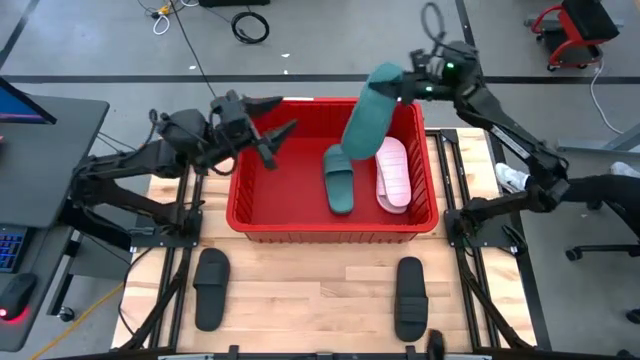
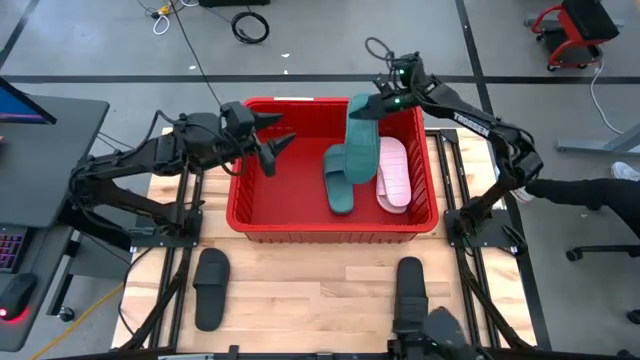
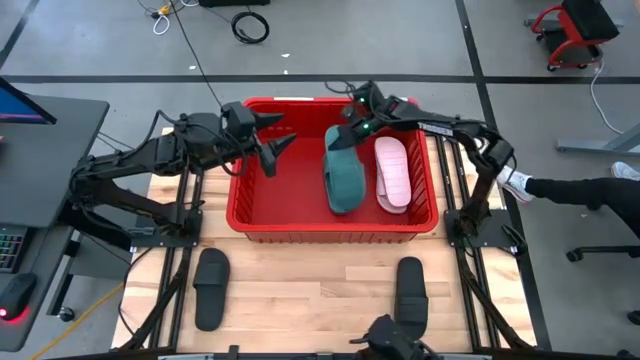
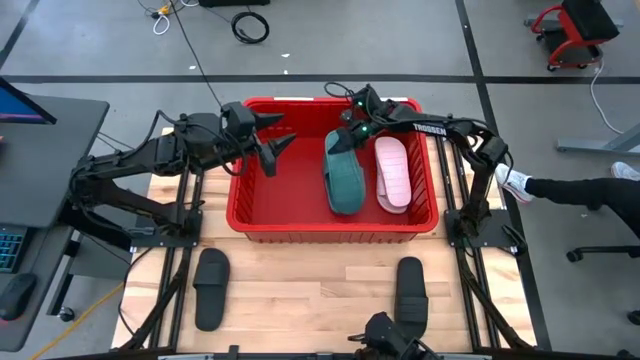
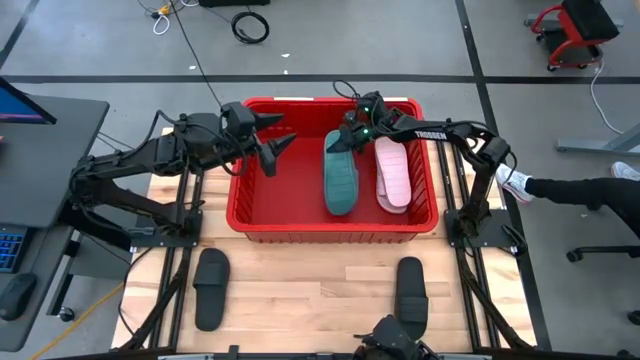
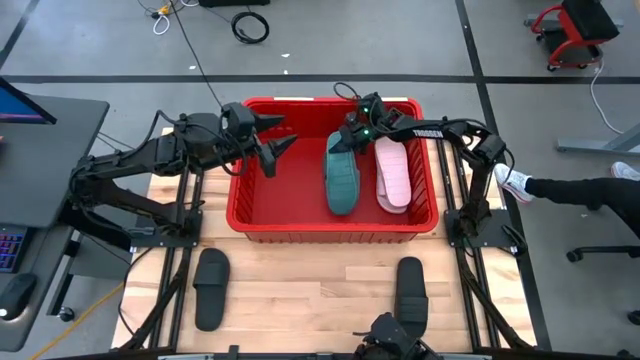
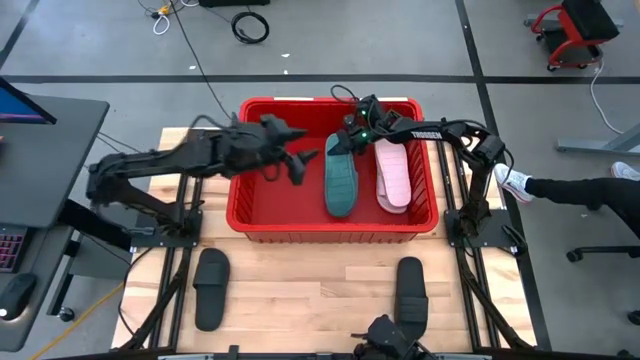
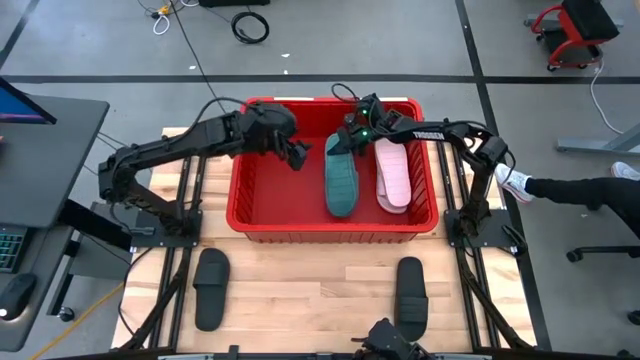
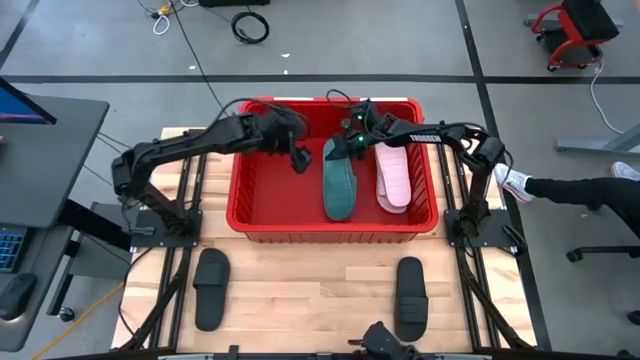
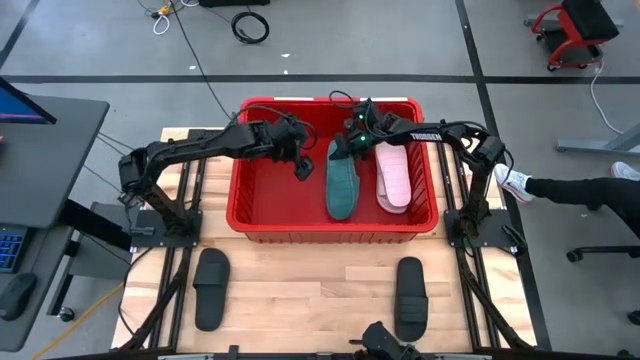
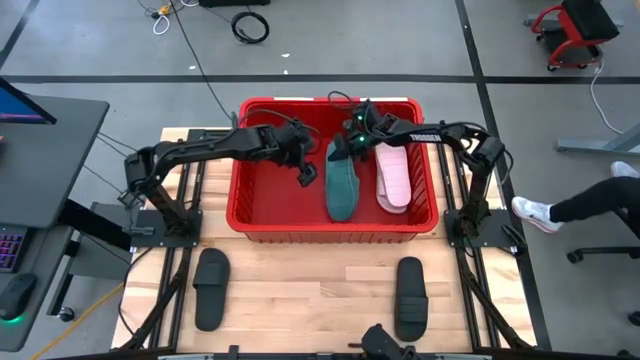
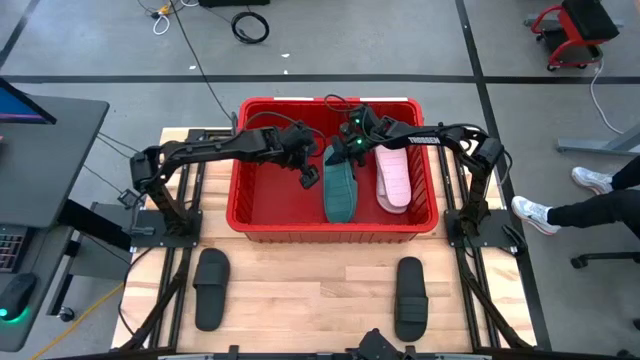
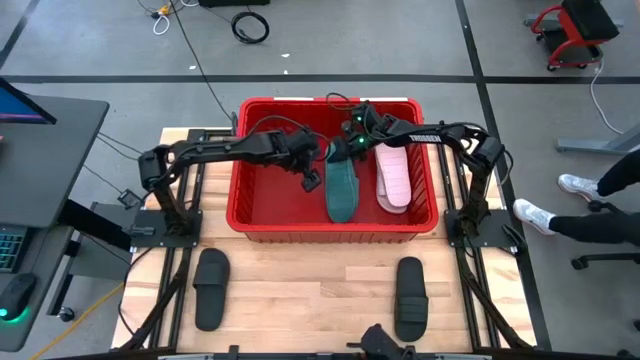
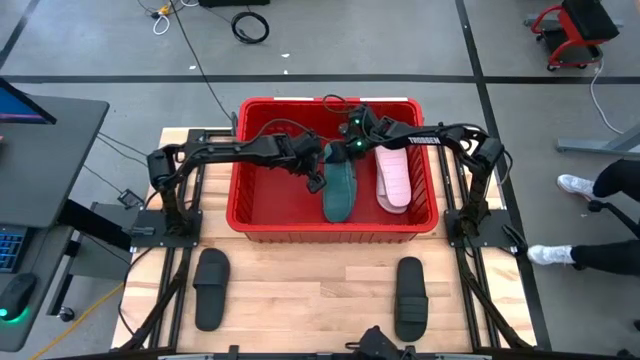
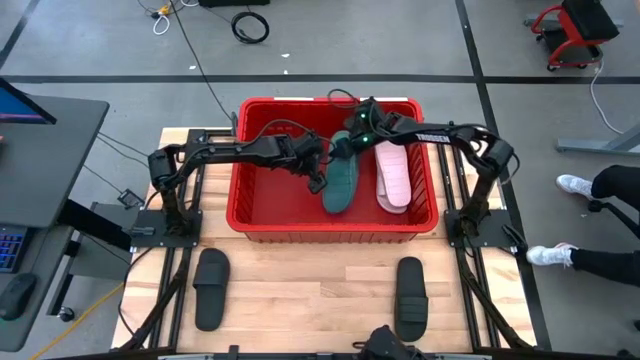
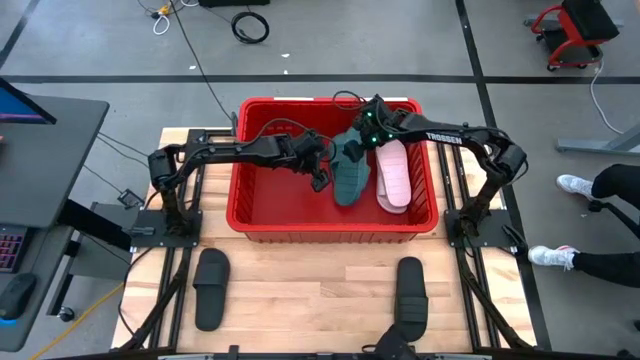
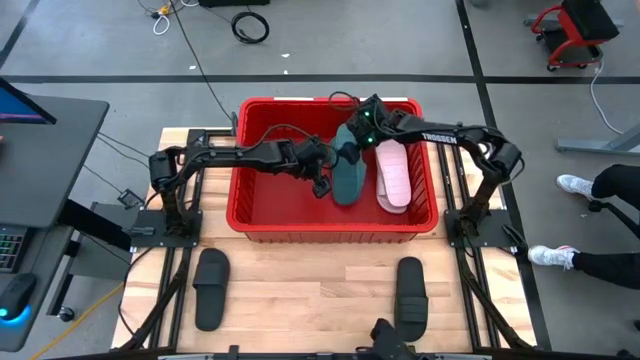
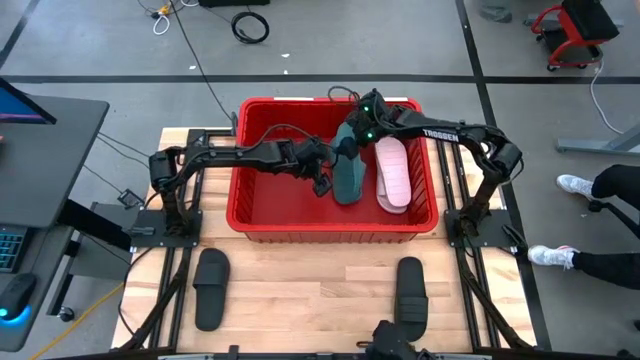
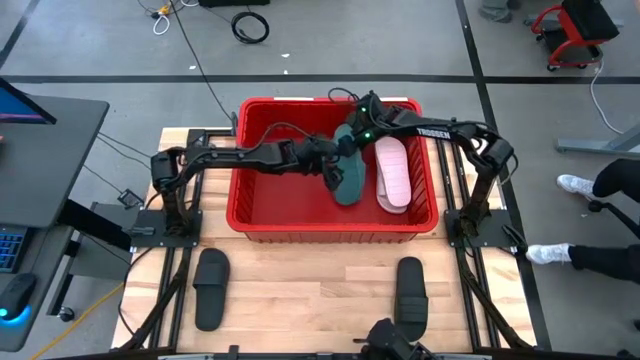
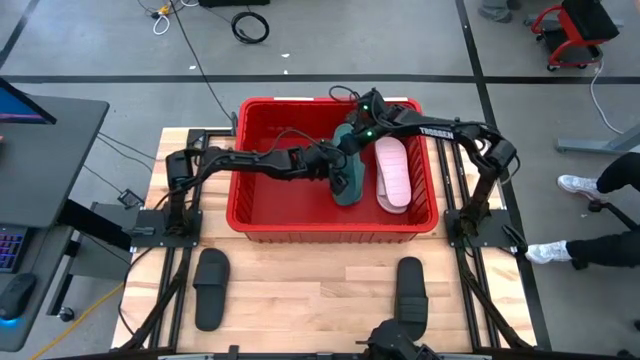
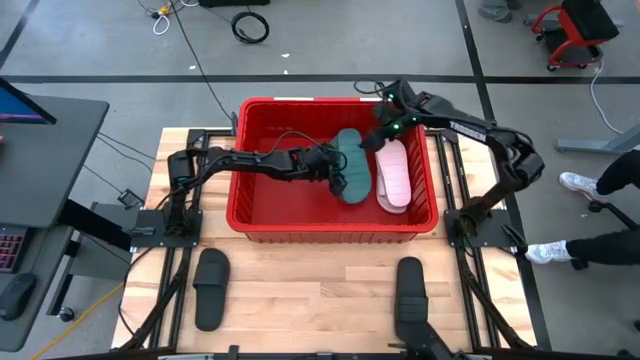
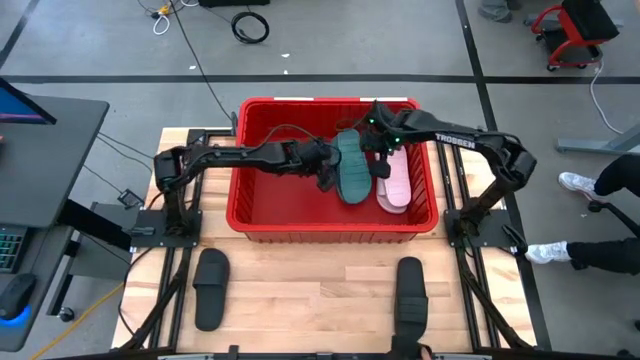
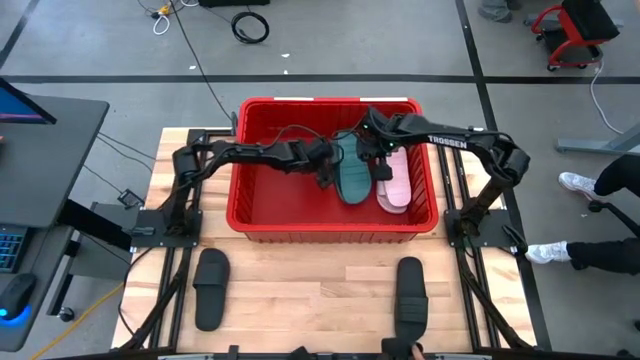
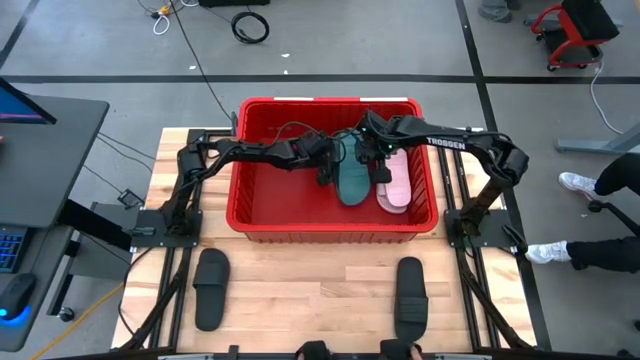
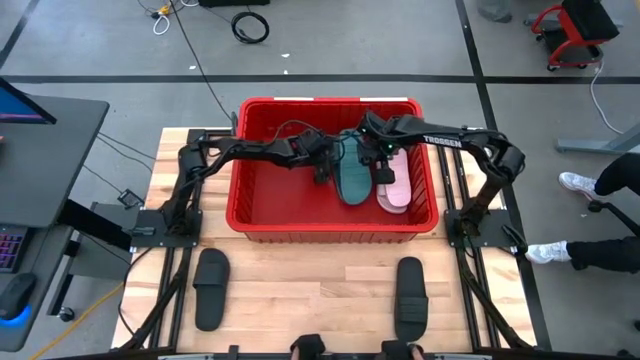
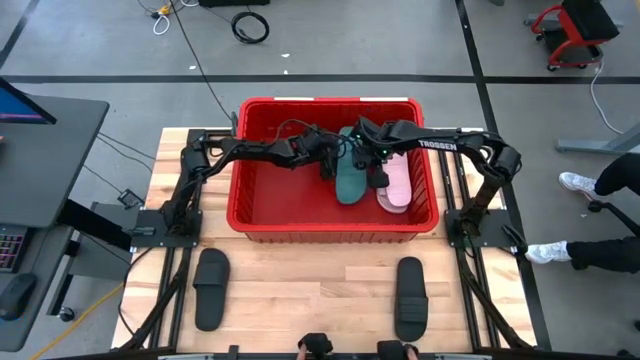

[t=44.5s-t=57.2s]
Task: Pick and place slides into bin
Stack the blue slipper on top of the other blue slipper in the red bin

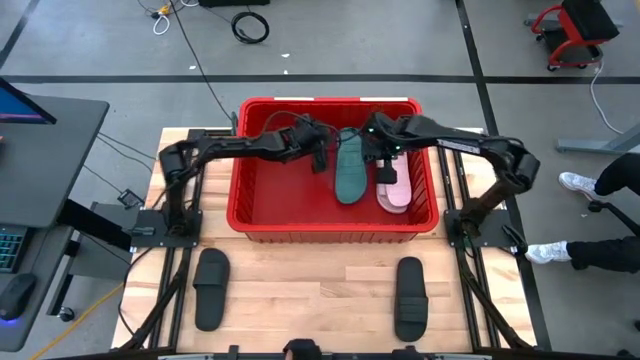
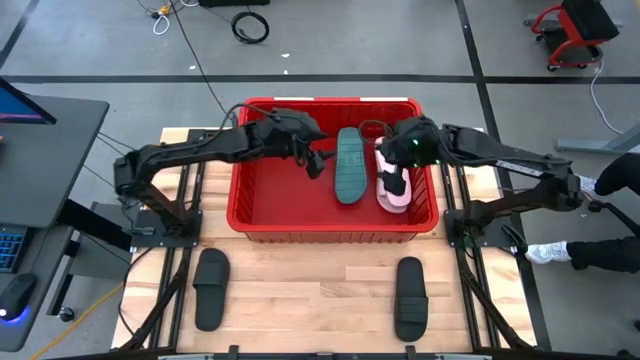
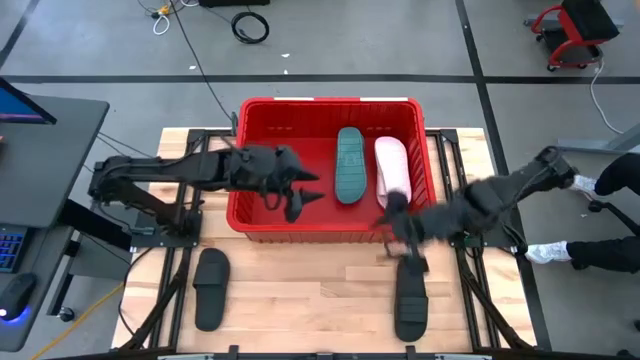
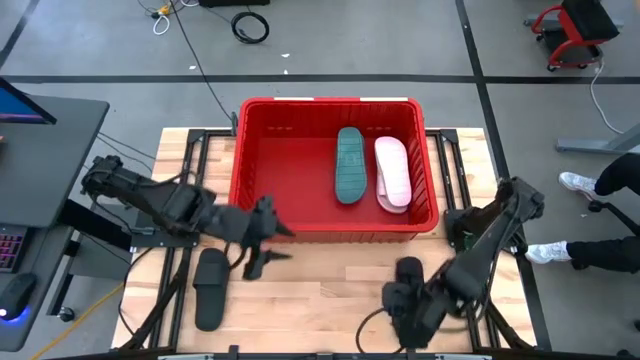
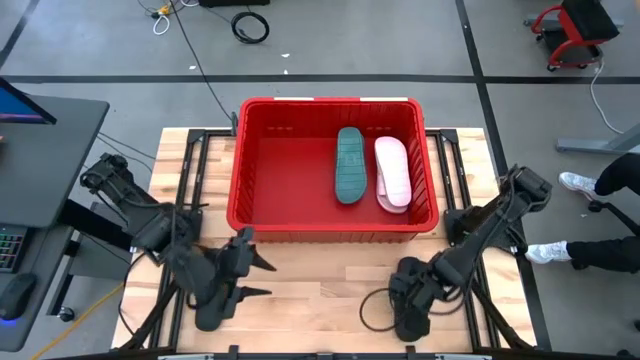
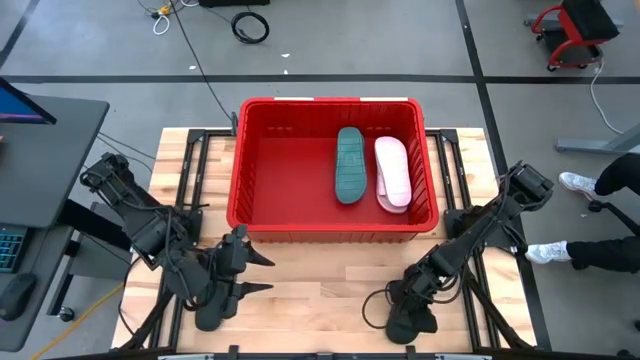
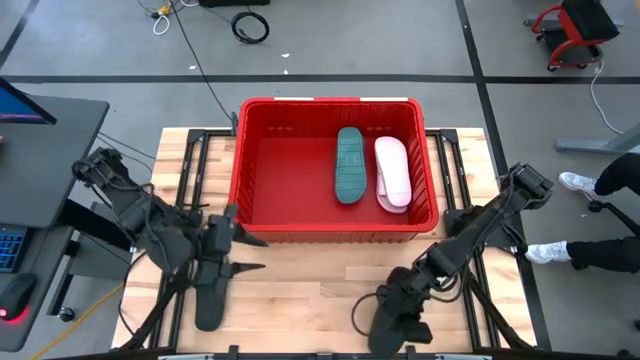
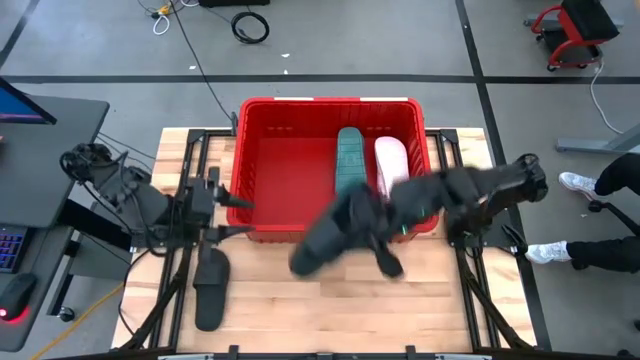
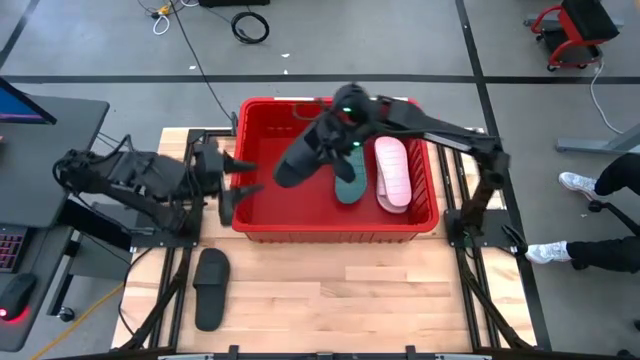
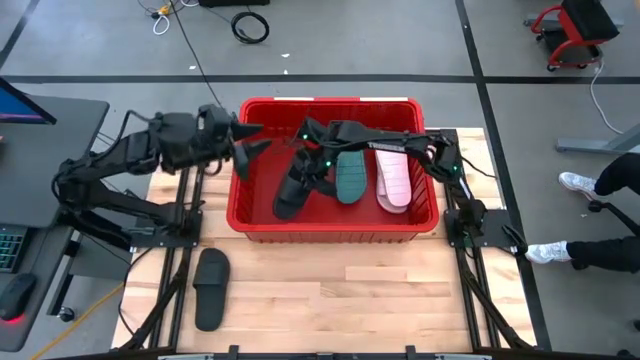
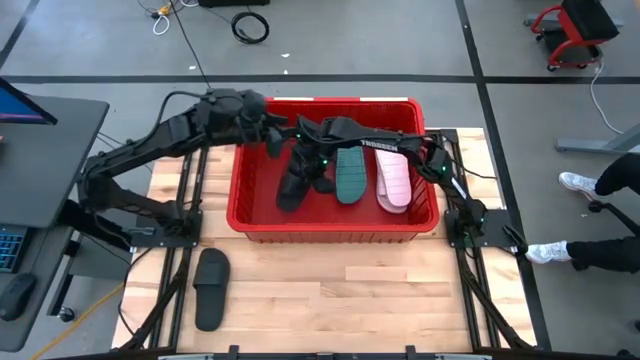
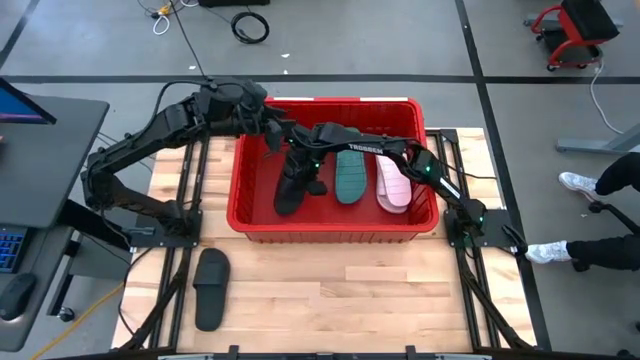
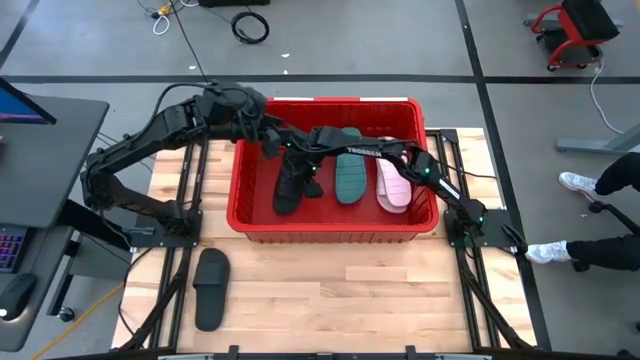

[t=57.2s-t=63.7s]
Put the right black slipper into the red bin

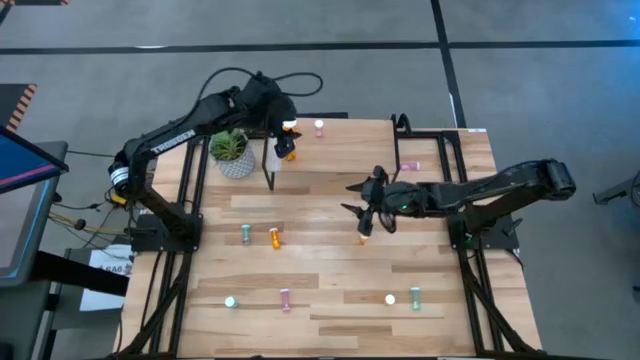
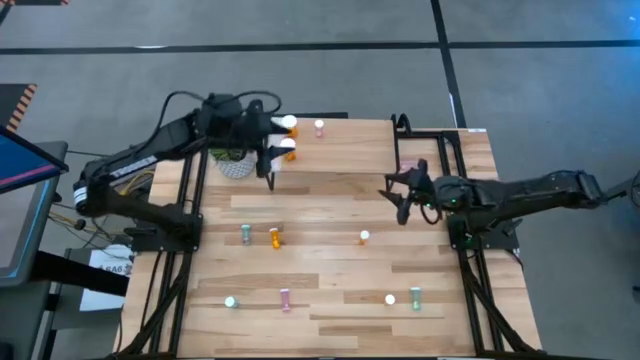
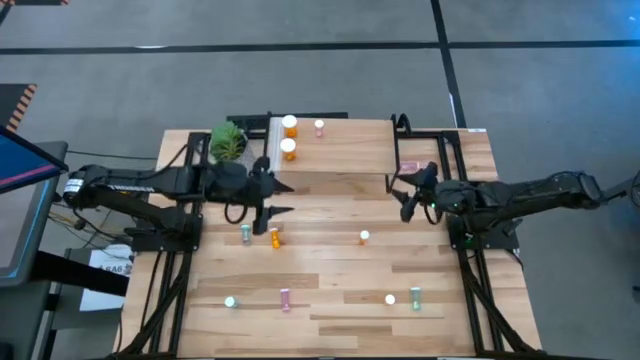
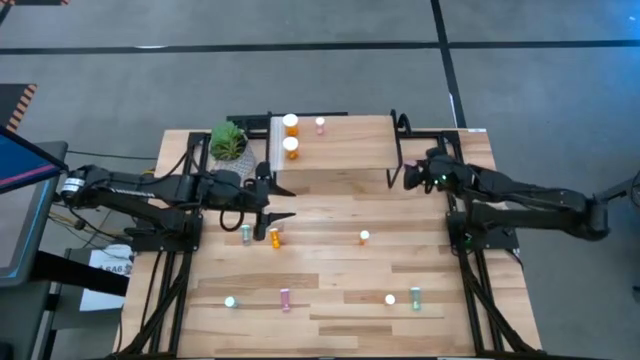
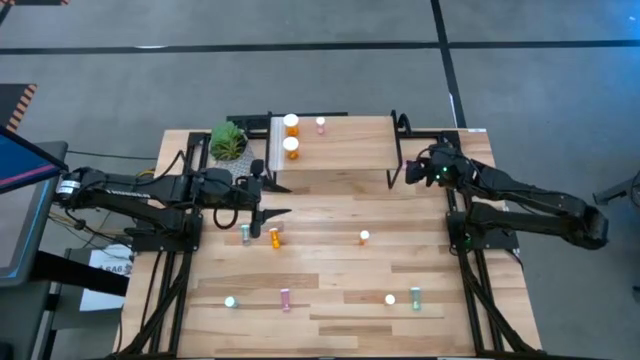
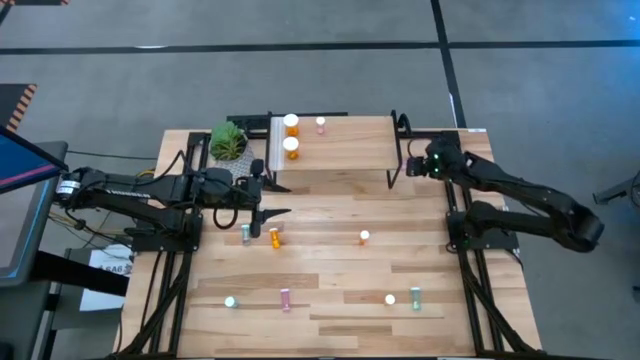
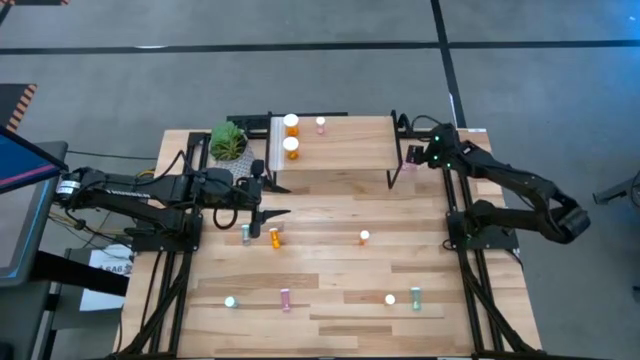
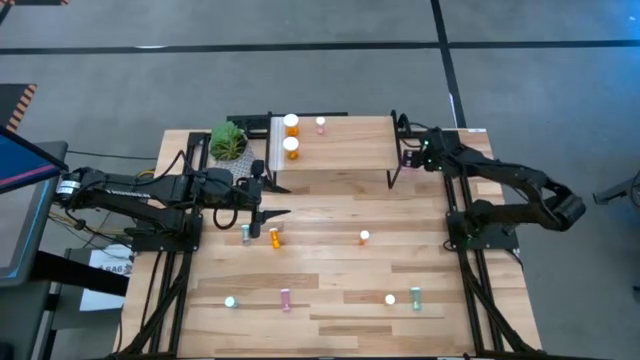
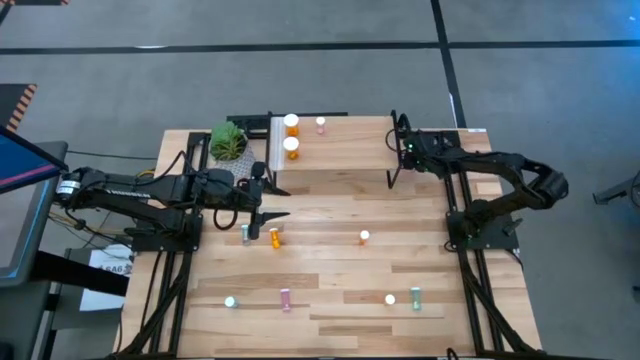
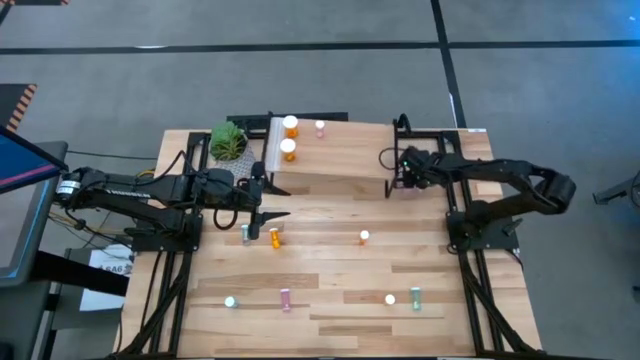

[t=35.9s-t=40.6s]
Task: Pick and place medicine bottles onto shelf by color
Put the top pink bottle aligned with the other pink pill bottle on the shelf
